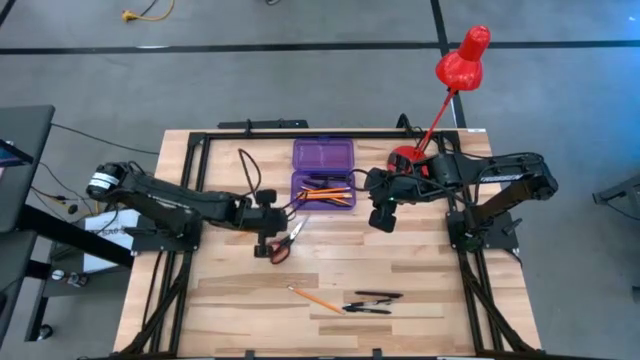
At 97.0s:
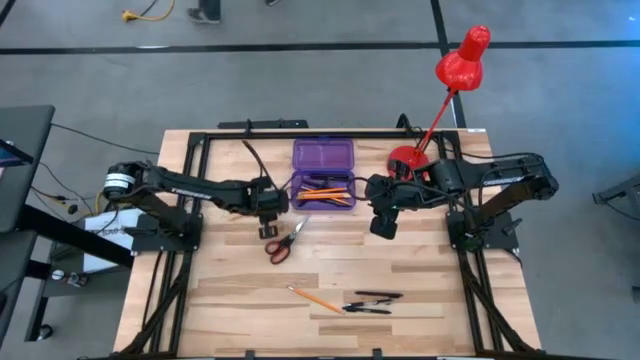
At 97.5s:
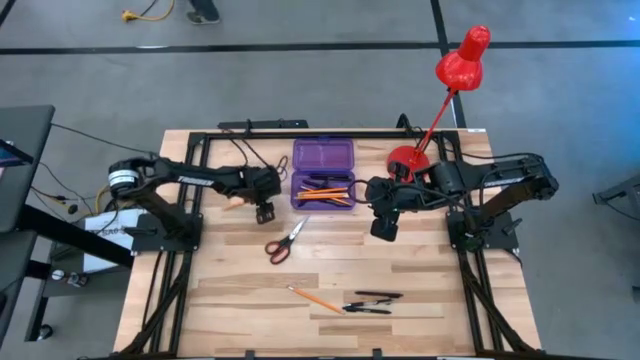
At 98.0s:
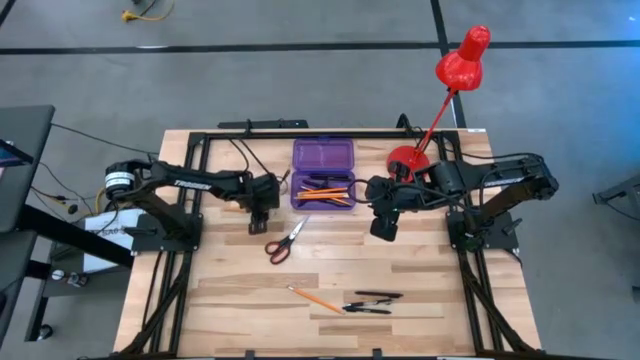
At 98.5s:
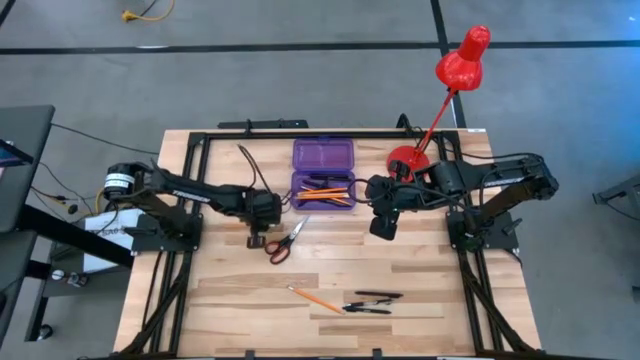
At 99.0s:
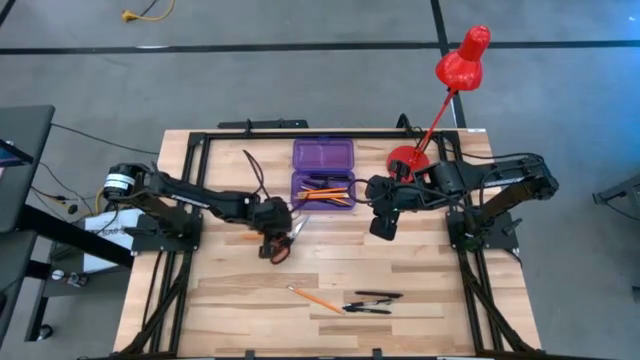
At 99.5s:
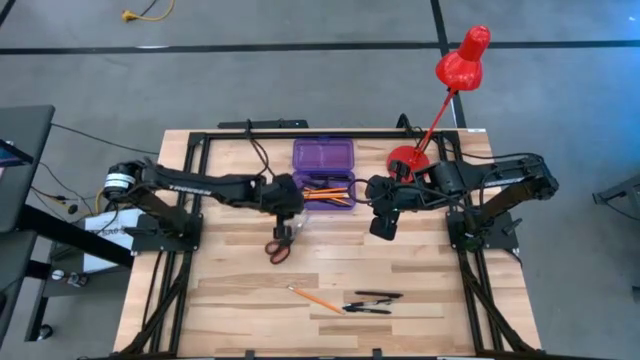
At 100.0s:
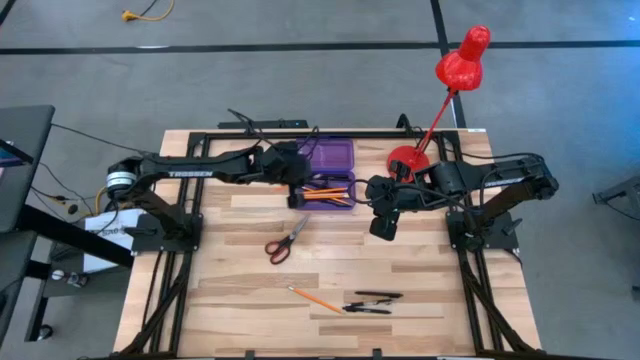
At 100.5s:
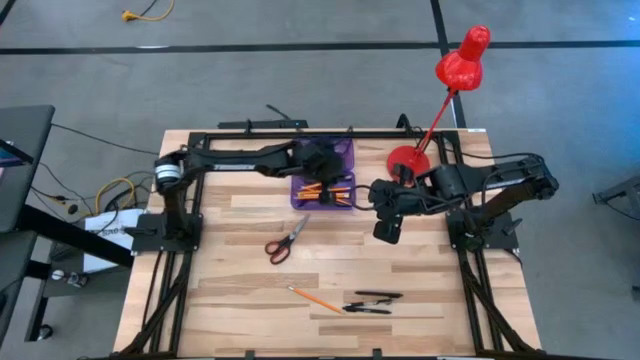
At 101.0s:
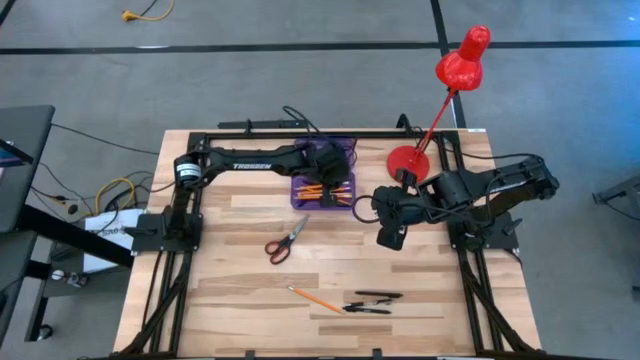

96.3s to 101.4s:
Task: Pick & place school supplies into a supply box
Put the yellow pencil into the purple supply box

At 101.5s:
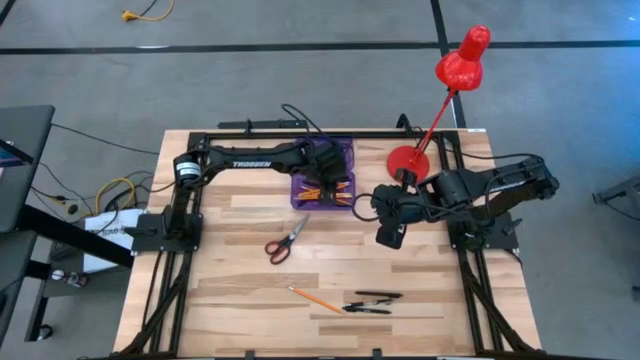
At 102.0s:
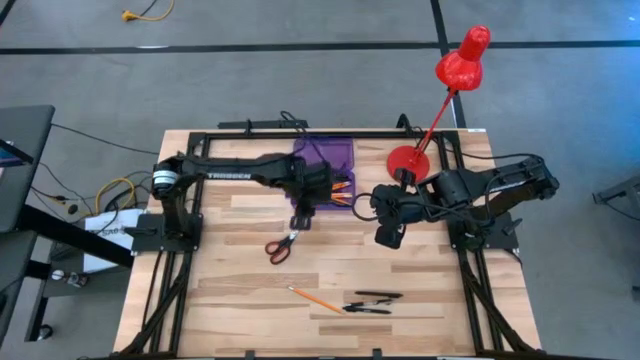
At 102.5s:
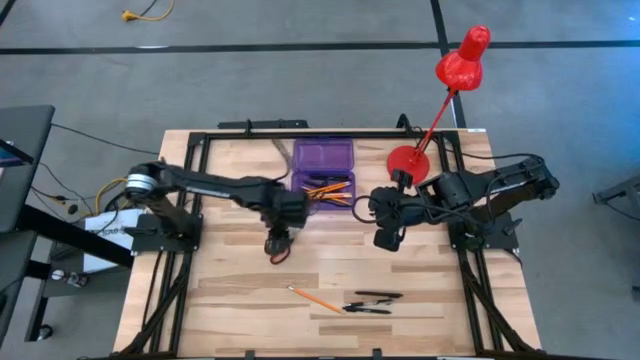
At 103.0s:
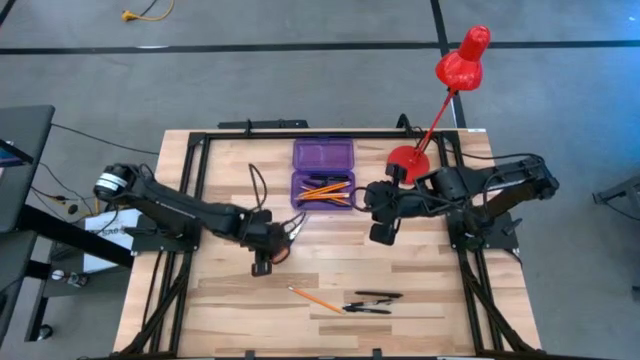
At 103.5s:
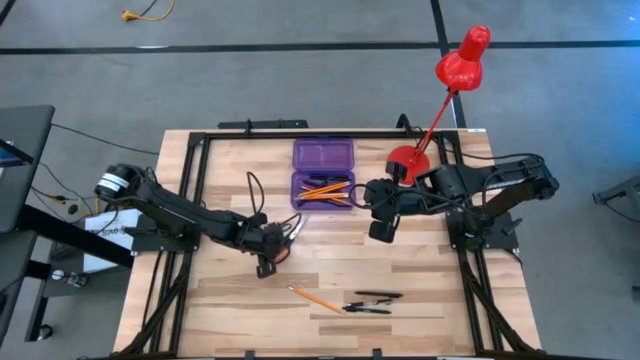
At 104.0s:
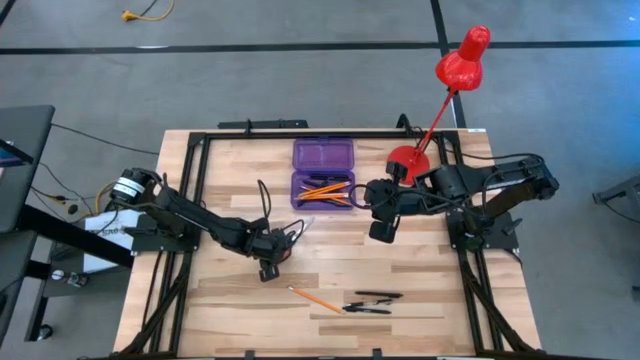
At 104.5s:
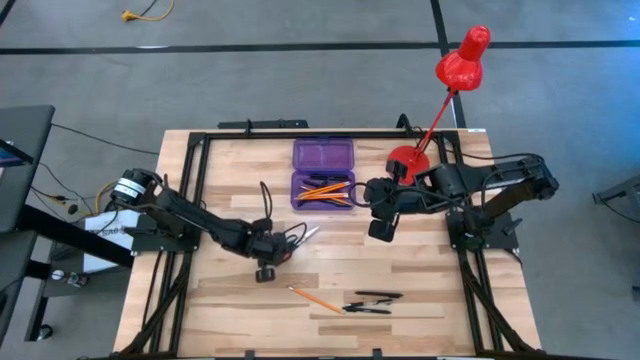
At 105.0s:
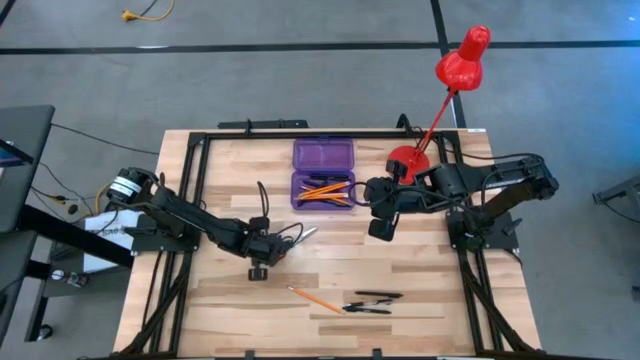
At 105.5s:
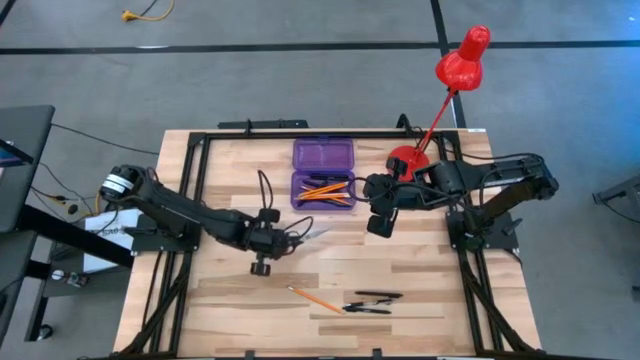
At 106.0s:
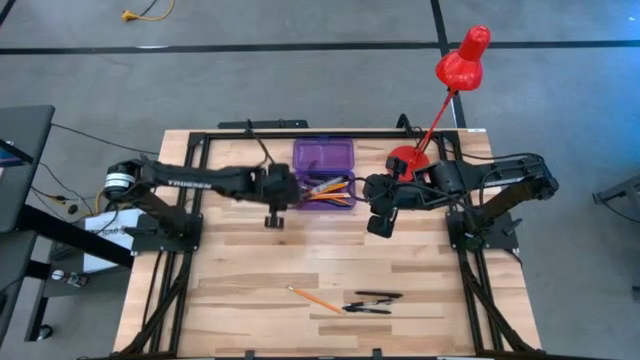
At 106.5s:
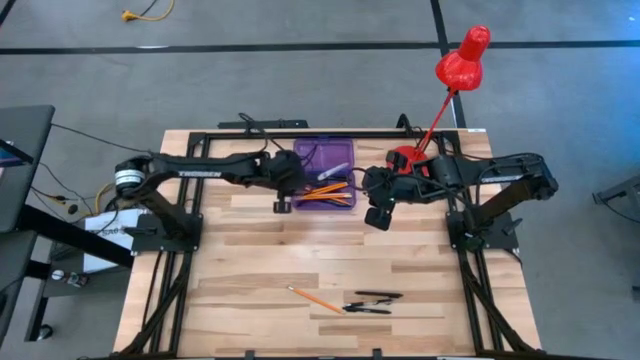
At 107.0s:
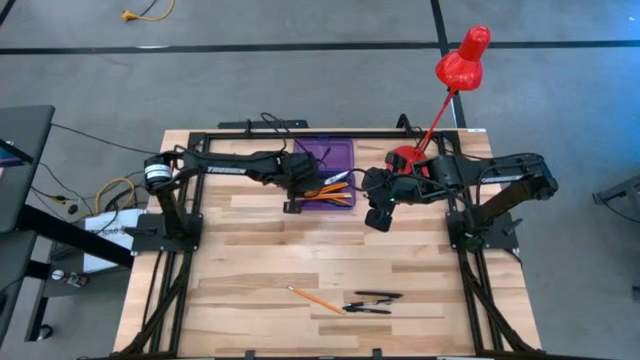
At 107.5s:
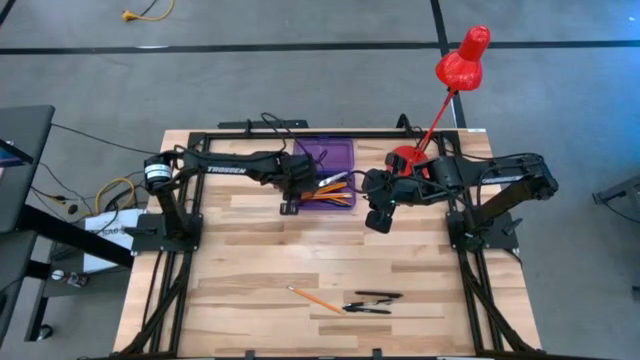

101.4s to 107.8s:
Put the scissors into the purple supply box

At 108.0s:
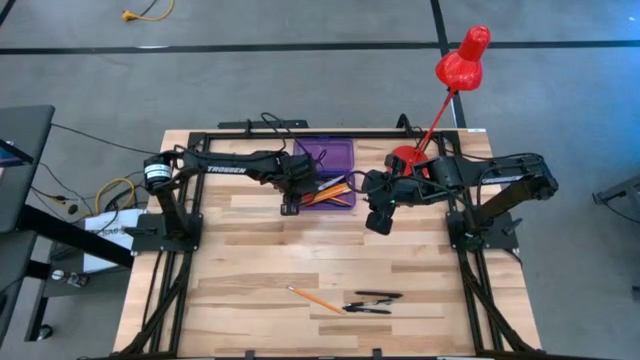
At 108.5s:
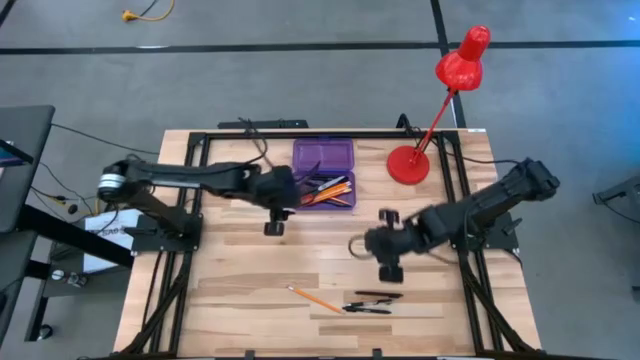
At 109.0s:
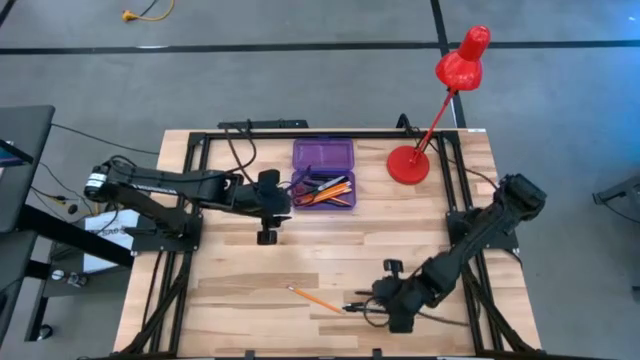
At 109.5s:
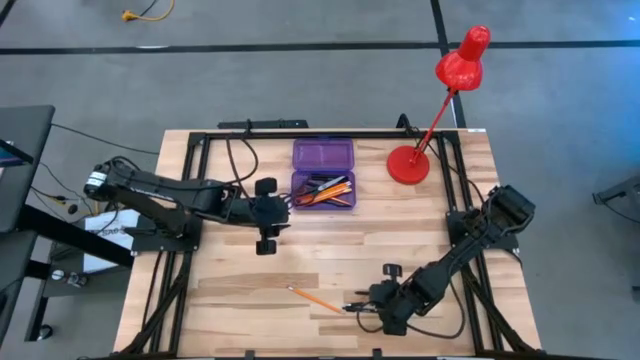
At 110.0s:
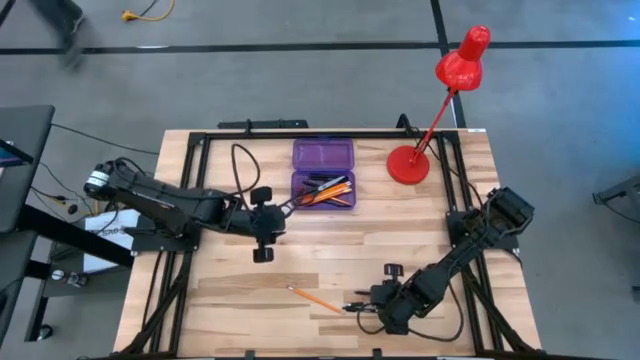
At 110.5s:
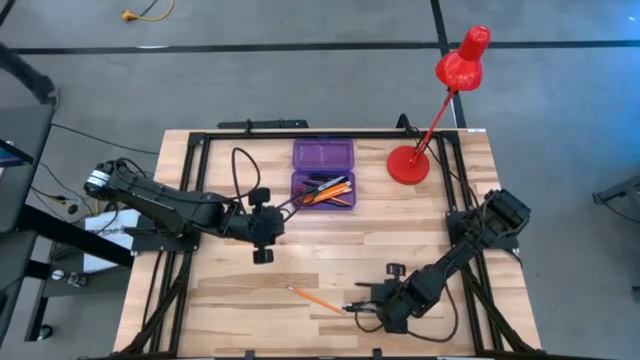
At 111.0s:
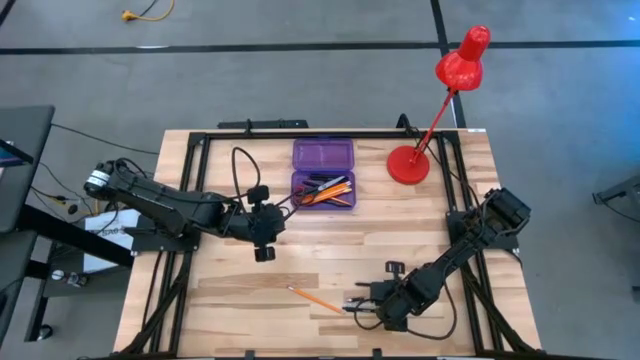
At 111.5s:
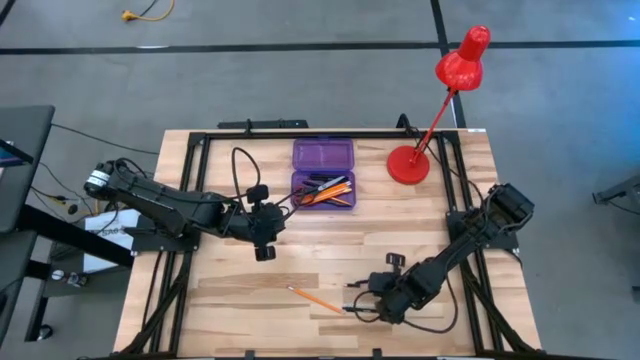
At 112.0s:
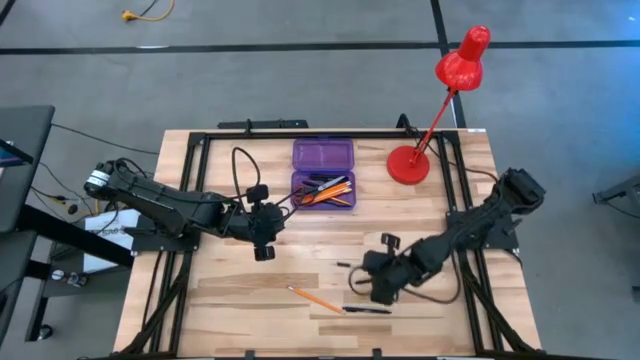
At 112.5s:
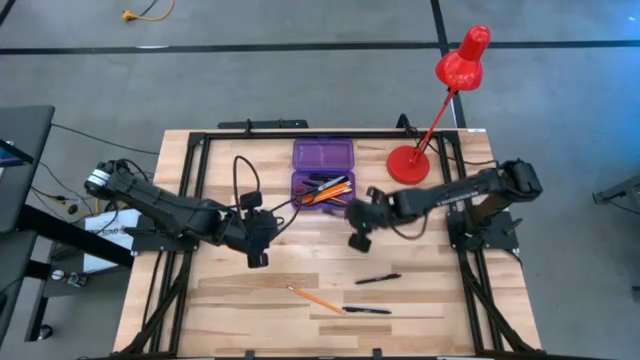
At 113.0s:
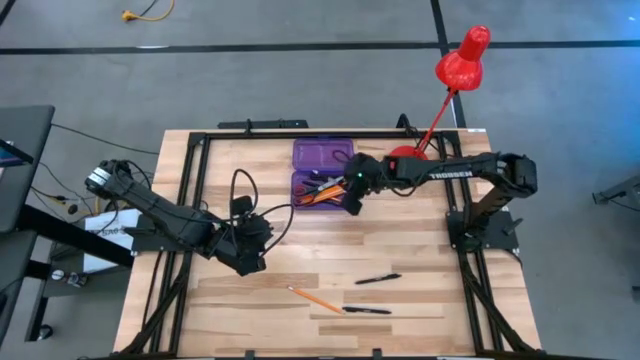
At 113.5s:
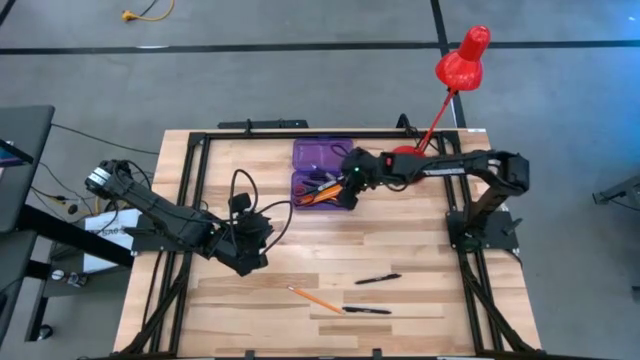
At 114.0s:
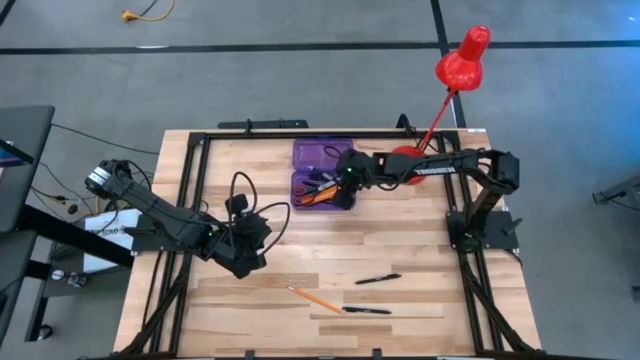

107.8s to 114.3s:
Put the black pen into the purple supply box

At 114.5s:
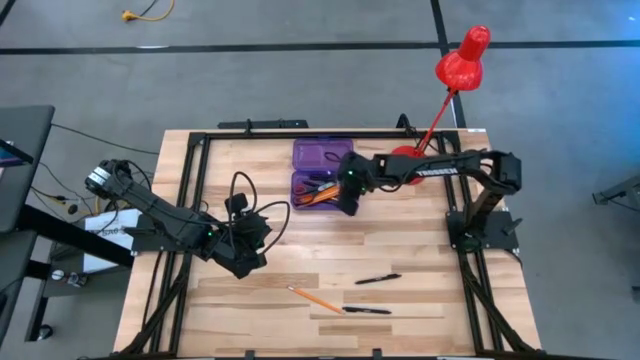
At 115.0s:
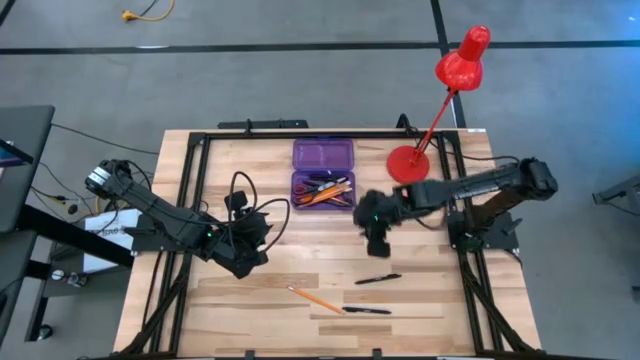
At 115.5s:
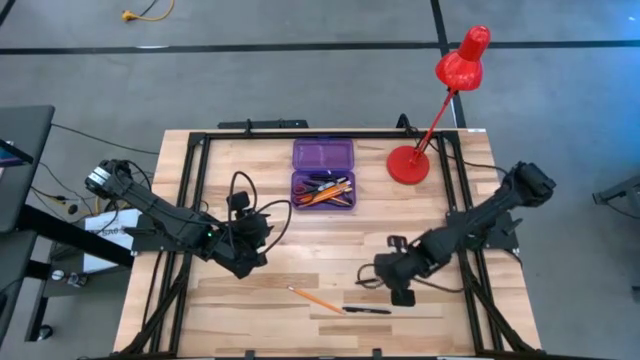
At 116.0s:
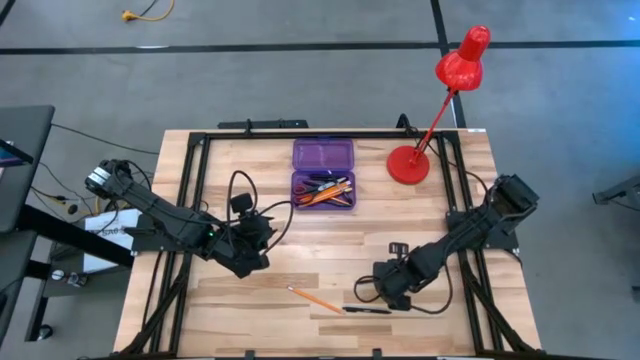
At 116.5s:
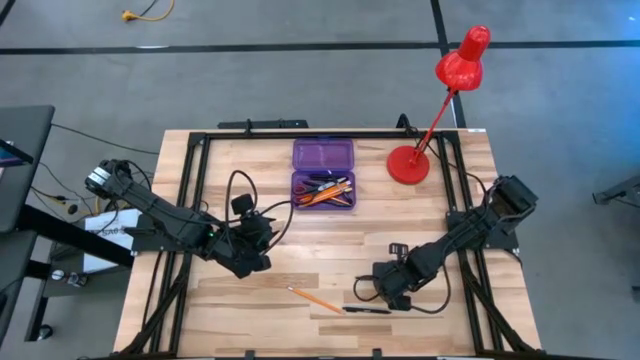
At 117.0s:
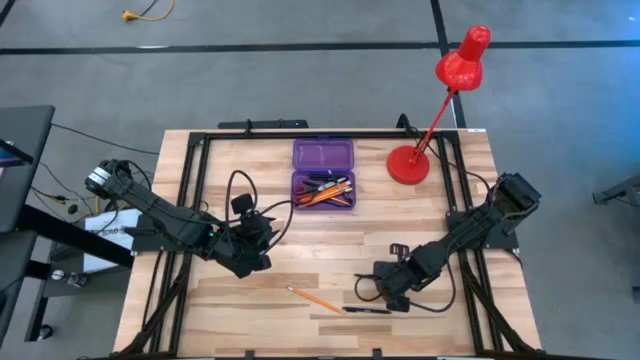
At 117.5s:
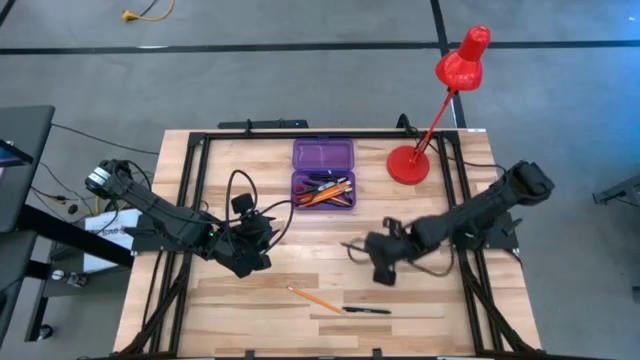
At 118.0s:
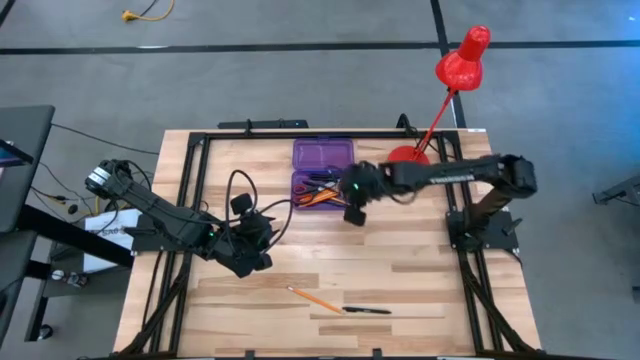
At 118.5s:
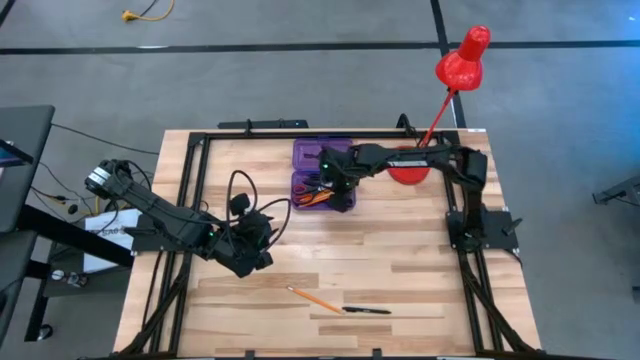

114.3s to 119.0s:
Put the black pen into the purple supply box
